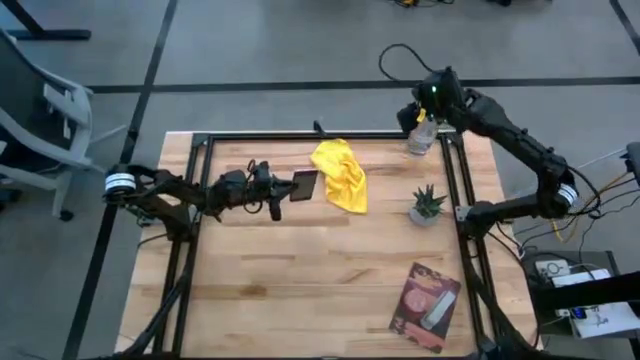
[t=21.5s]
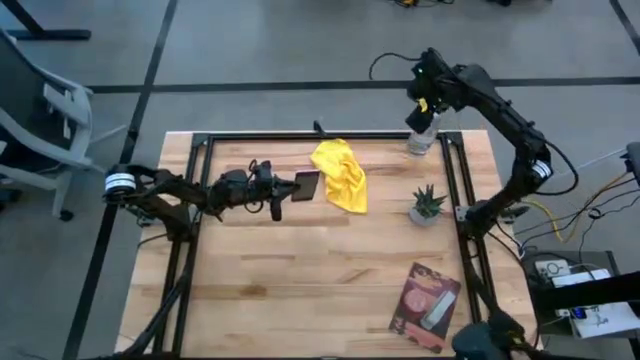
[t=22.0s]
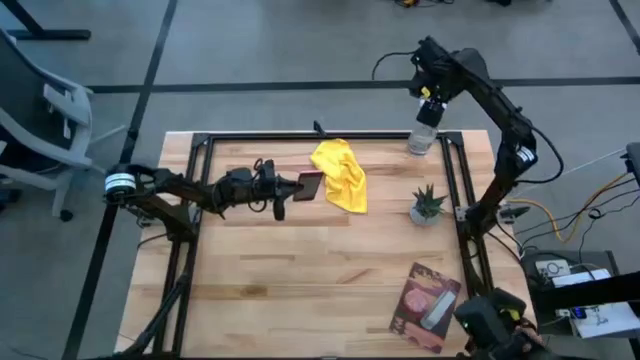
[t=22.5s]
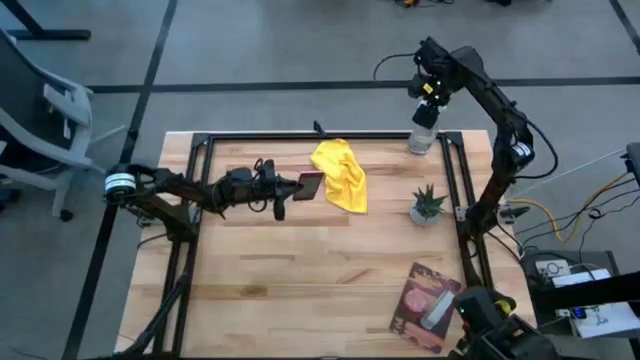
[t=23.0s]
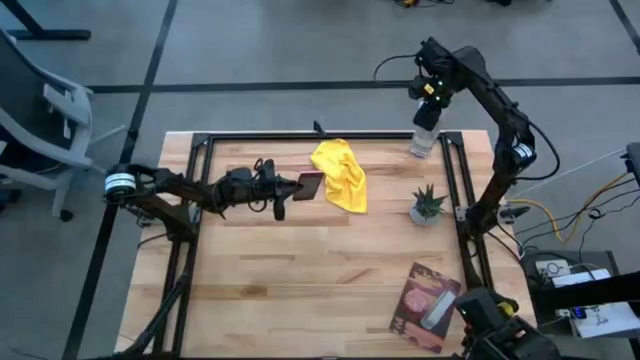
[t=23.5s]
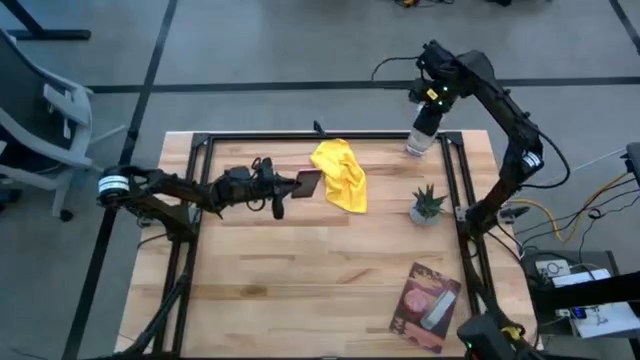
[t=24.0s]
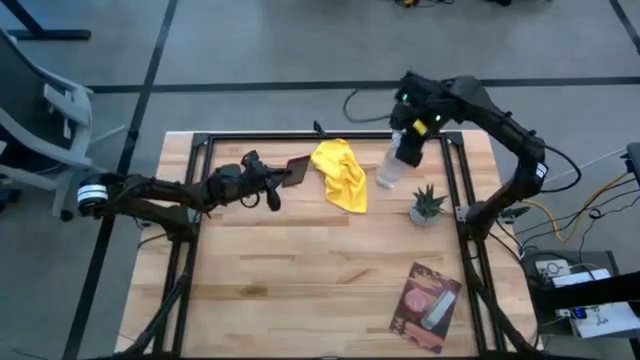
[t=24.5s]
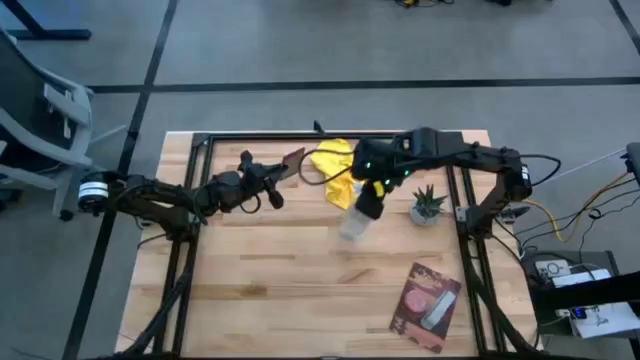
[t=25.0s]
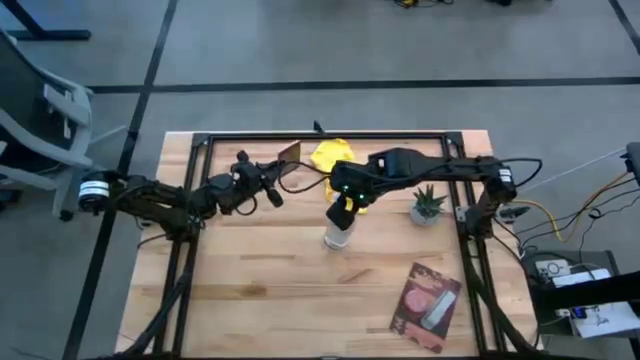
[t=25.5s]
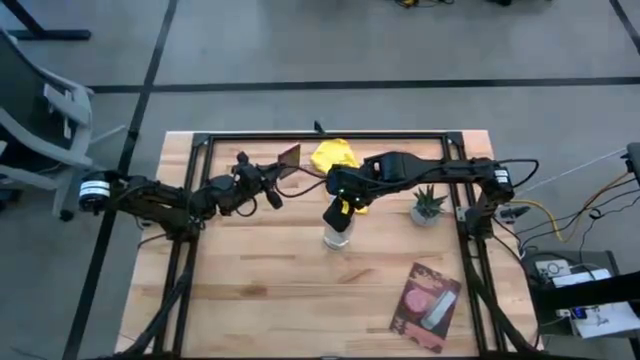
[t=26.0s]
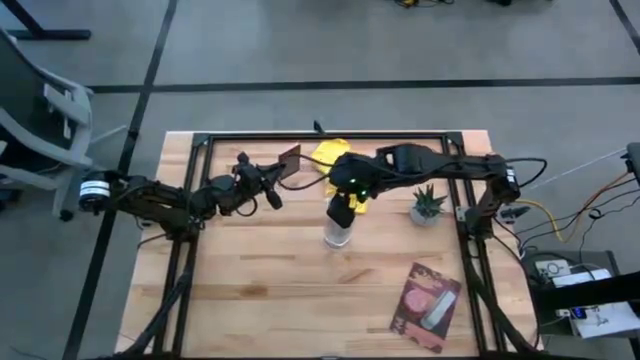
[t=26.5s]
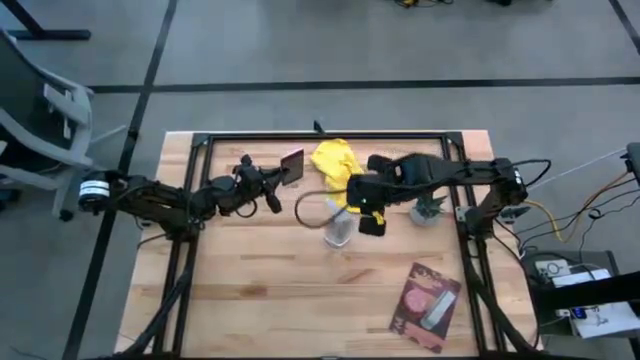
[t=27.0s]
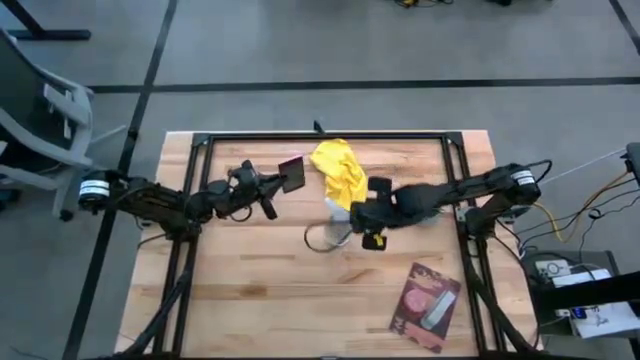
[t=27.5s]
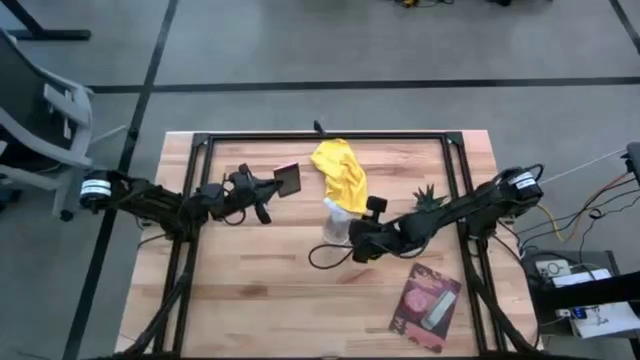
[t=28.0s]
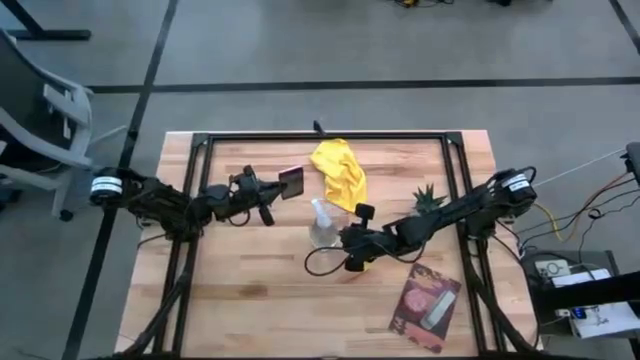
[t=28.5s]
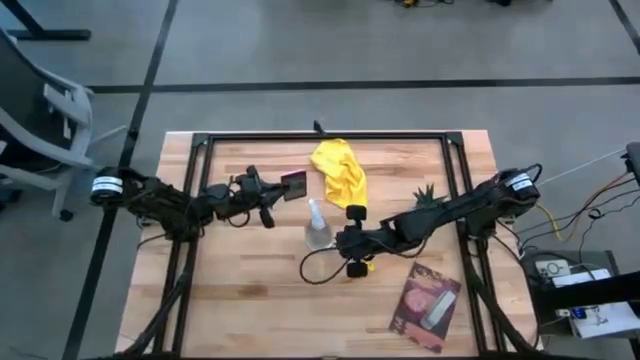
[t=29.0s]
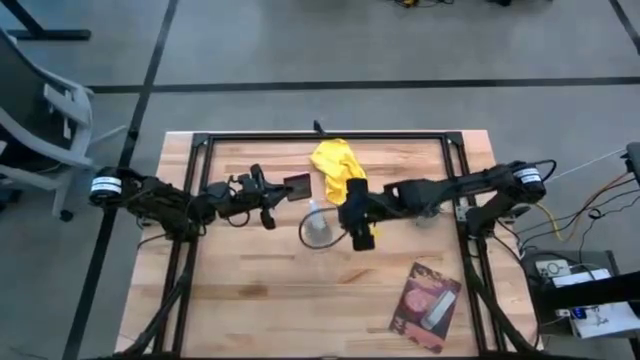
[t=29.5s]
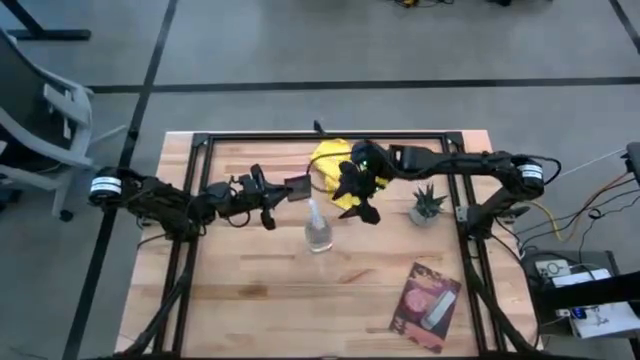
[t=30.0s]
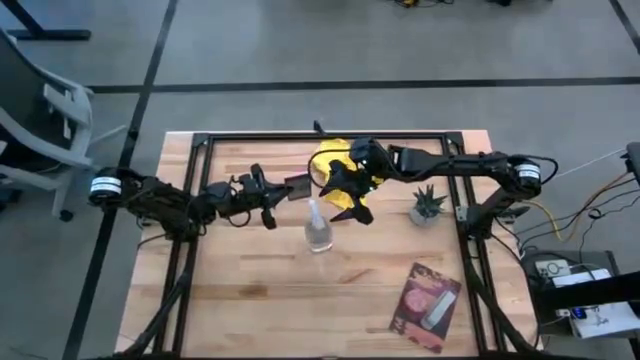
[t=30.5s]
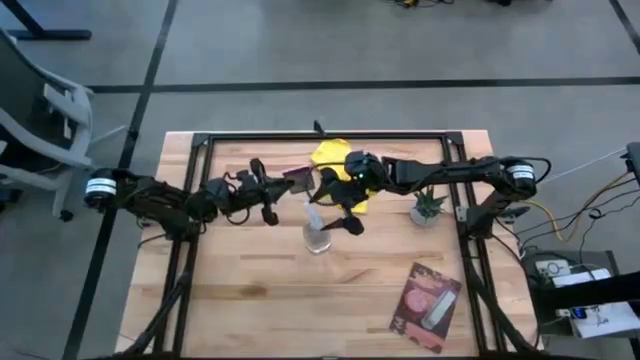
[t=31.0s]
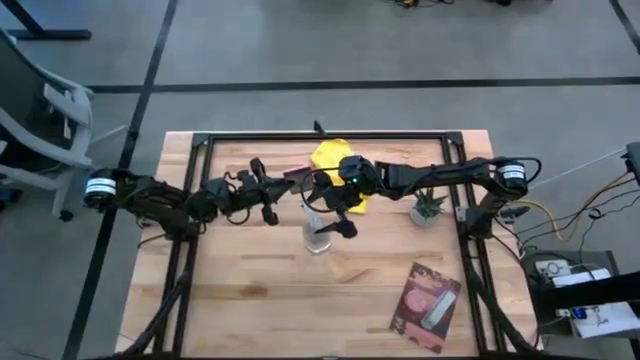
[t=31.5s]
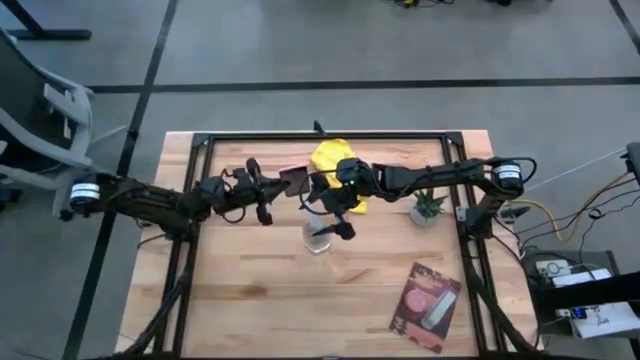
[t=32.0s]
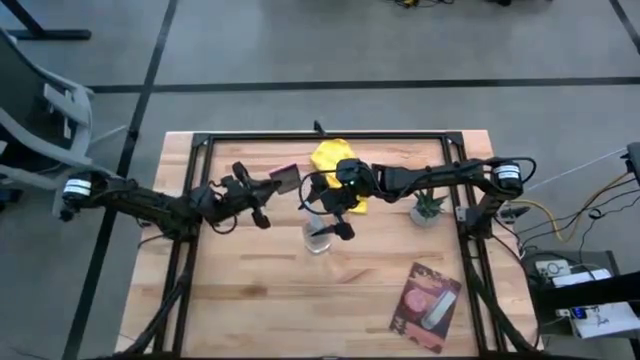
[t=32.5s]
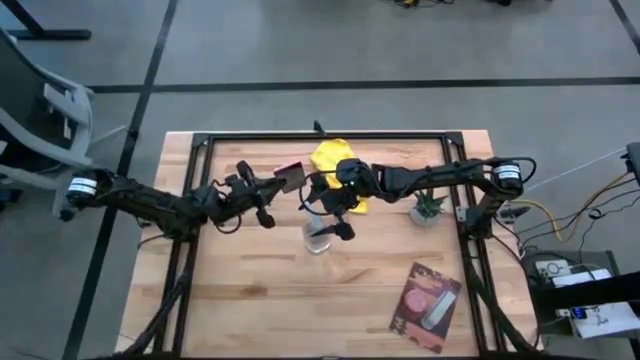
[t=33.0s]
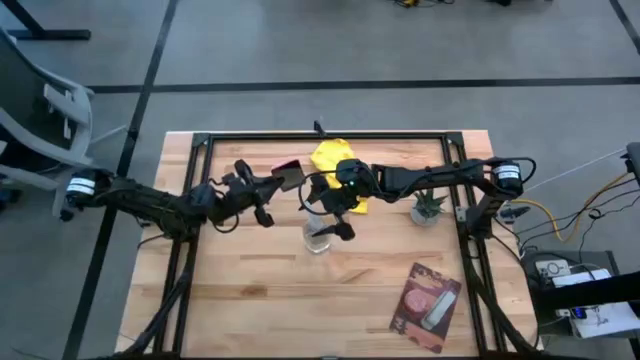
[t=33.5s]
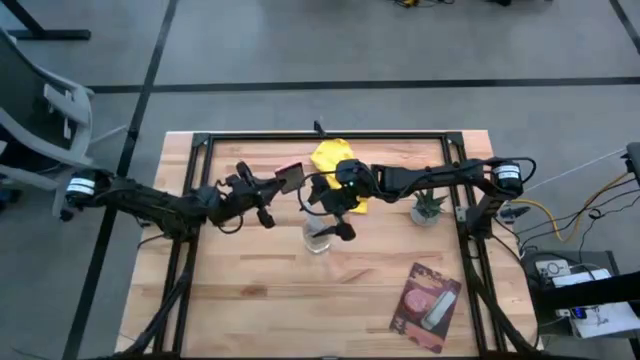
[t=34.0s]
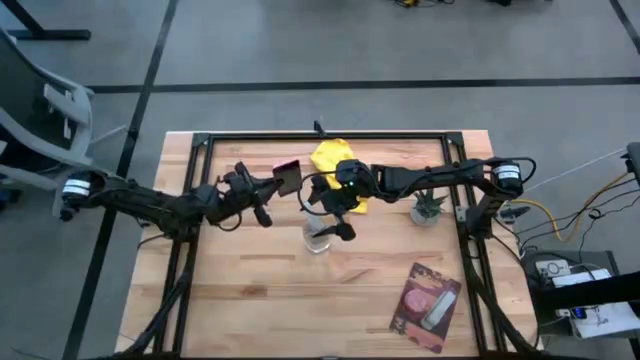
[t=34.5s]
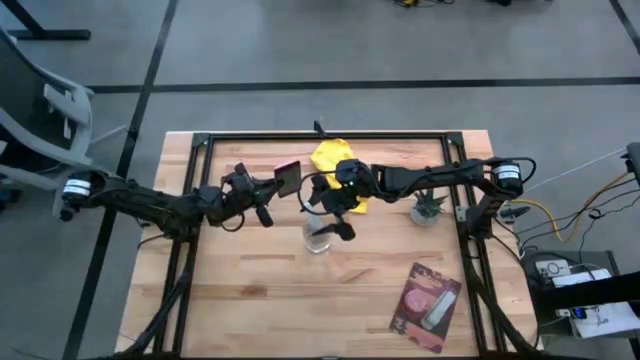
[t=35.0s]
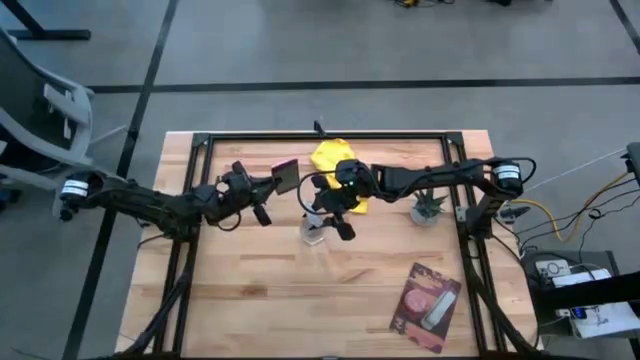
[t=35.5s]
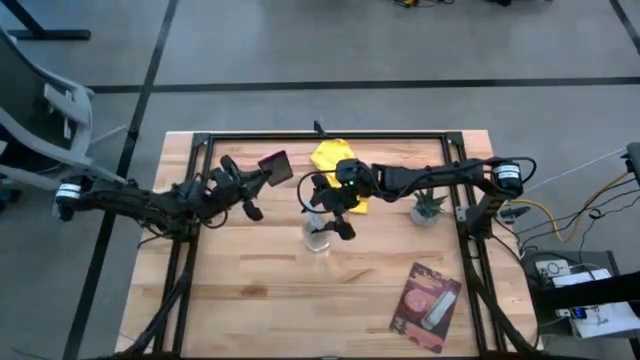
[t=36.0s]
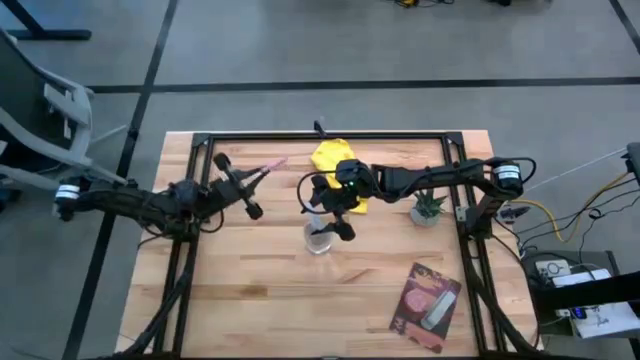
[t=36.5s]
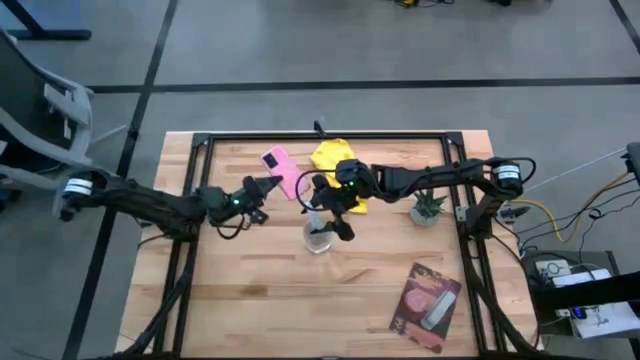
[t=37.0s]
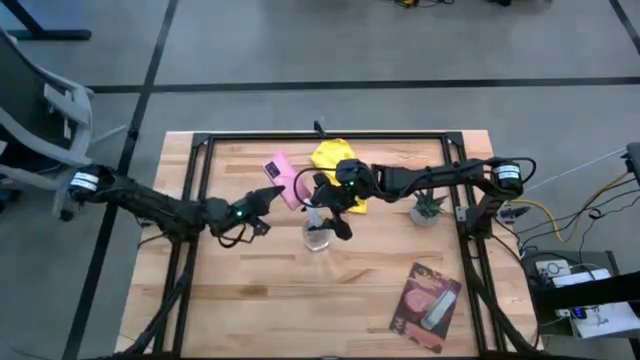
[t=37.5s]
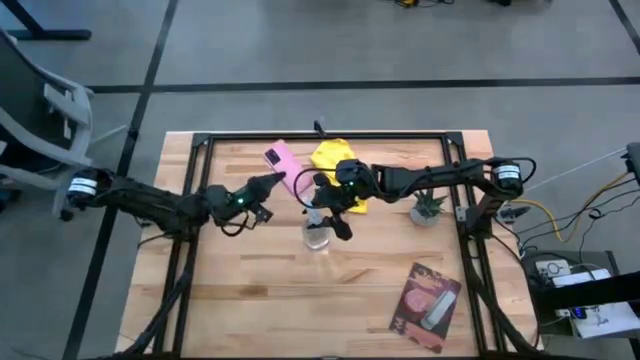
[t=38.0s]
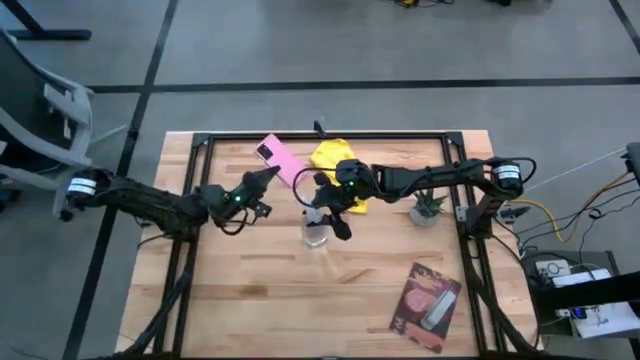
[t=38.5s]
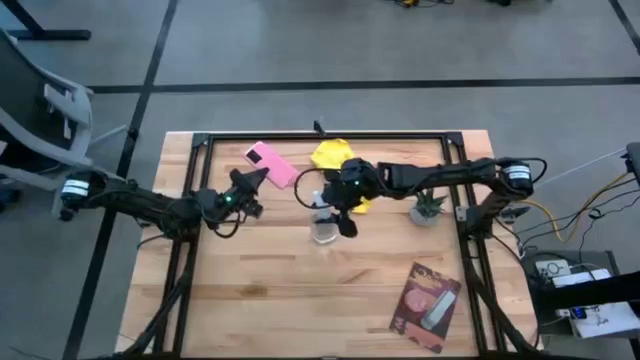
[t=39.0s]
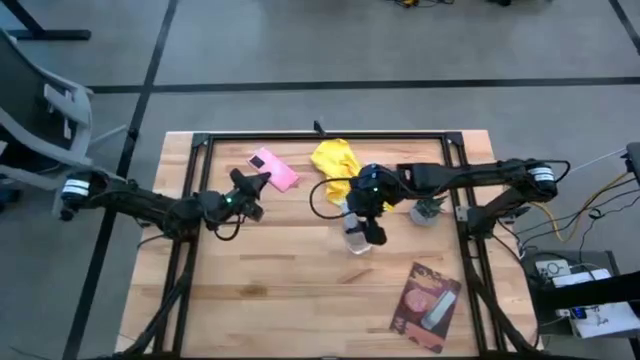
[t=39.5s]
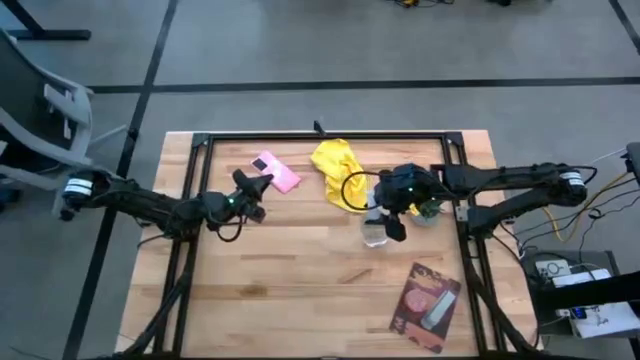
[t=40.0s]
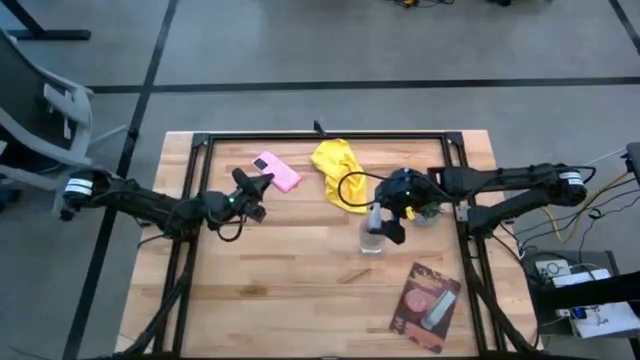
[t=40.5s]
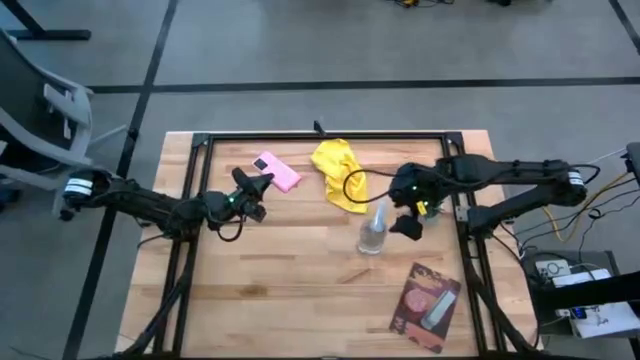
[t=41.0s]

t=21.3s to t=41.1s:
Task: Apply microfiber cloth
Spray the pink cellphone using the spray bottle
